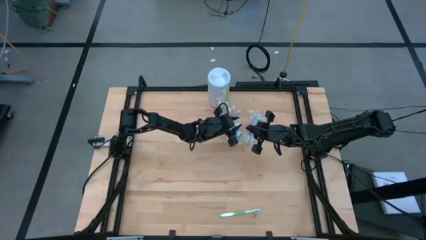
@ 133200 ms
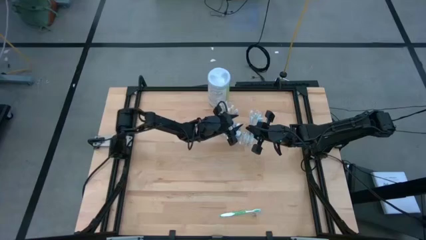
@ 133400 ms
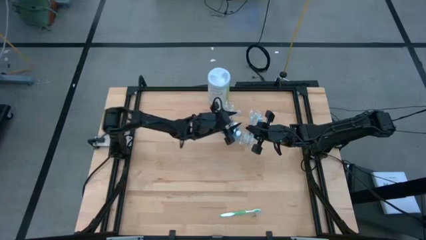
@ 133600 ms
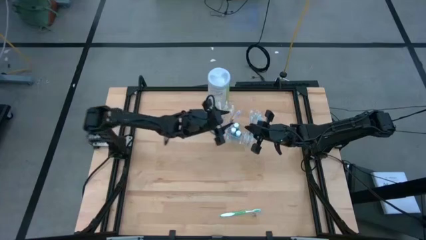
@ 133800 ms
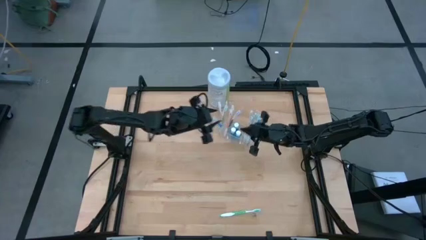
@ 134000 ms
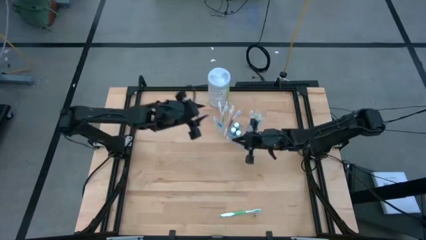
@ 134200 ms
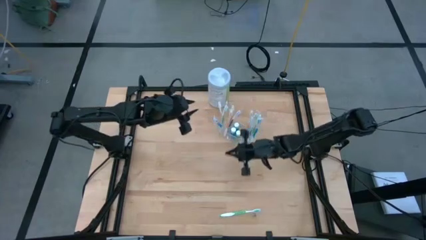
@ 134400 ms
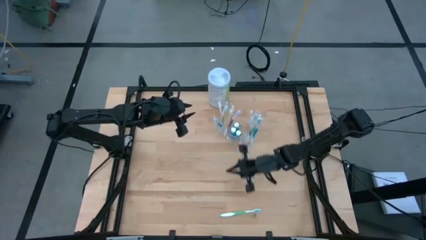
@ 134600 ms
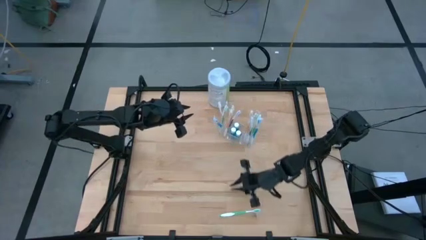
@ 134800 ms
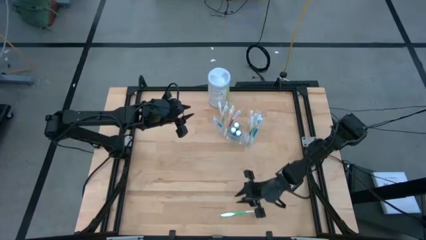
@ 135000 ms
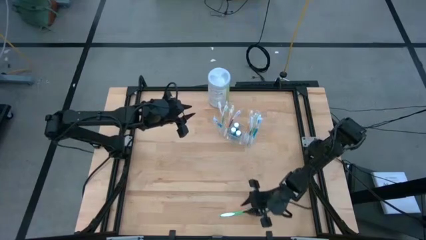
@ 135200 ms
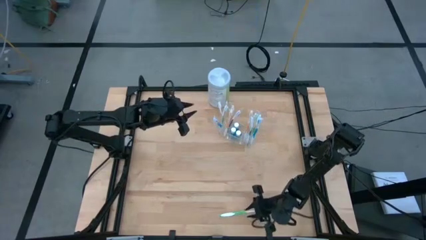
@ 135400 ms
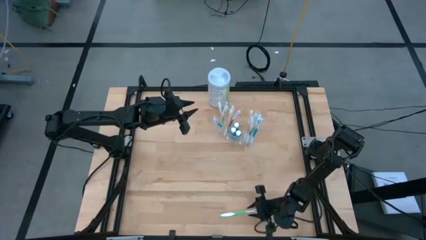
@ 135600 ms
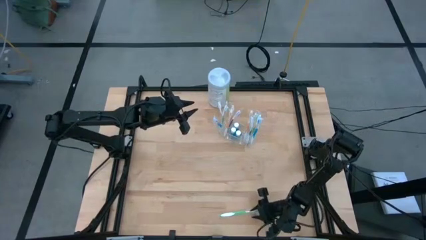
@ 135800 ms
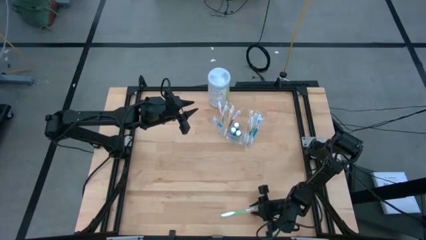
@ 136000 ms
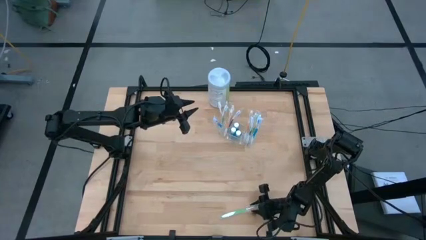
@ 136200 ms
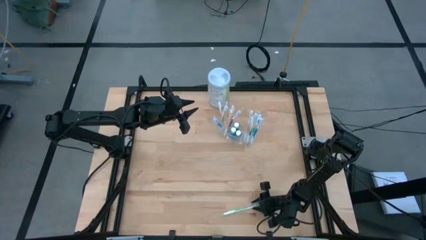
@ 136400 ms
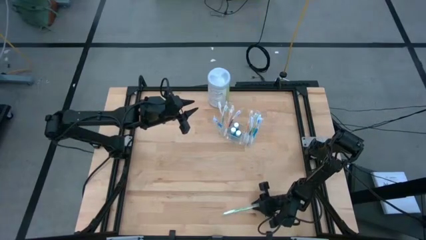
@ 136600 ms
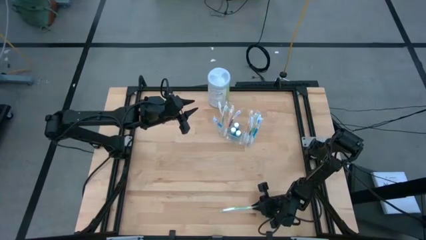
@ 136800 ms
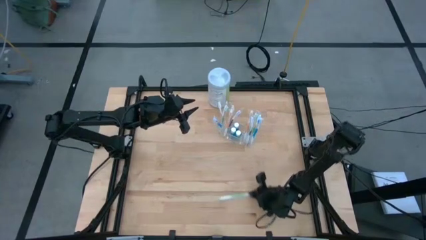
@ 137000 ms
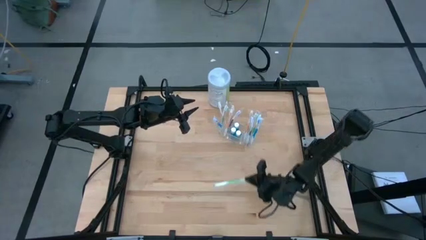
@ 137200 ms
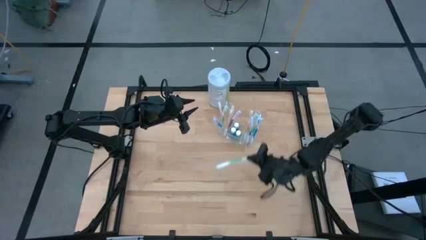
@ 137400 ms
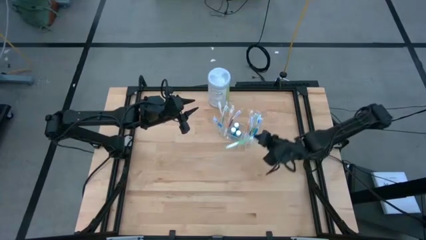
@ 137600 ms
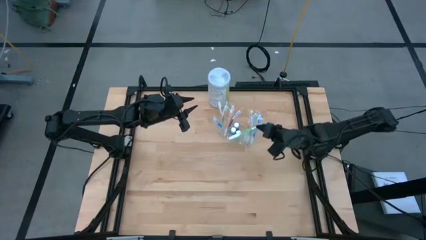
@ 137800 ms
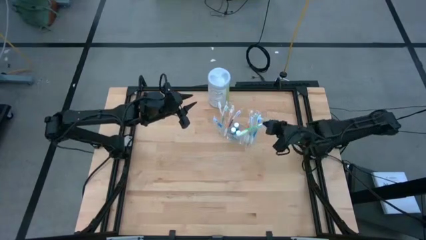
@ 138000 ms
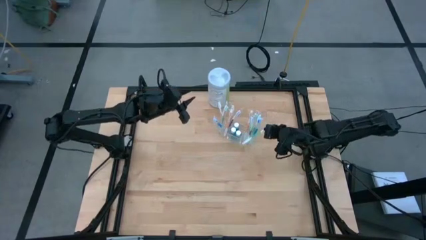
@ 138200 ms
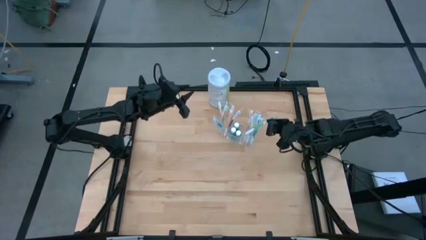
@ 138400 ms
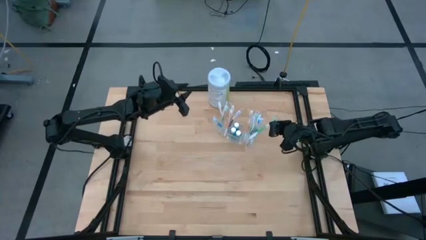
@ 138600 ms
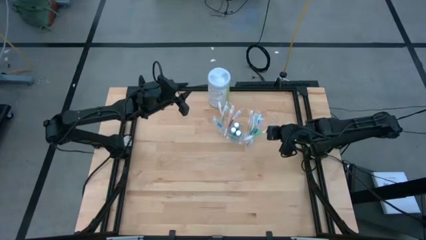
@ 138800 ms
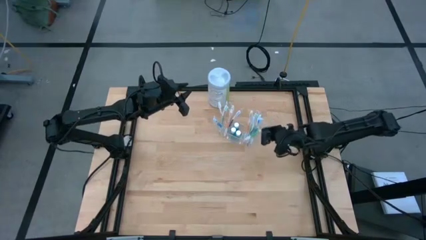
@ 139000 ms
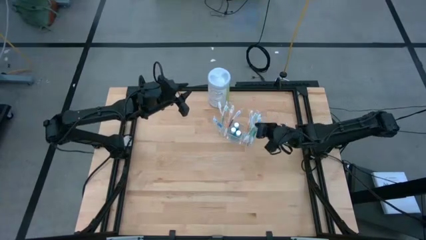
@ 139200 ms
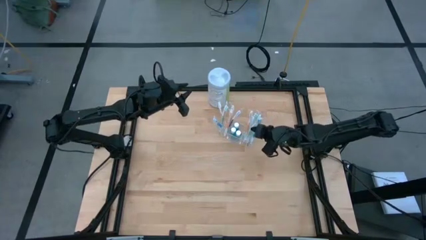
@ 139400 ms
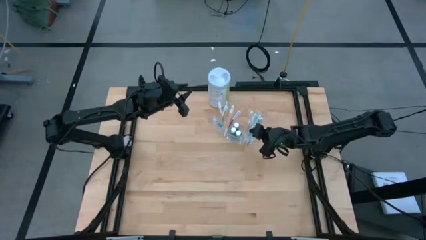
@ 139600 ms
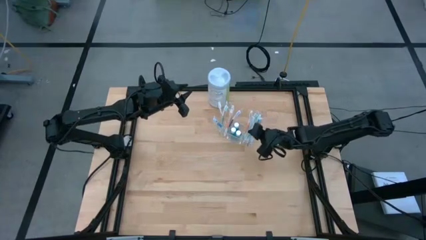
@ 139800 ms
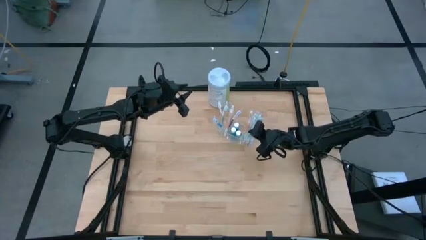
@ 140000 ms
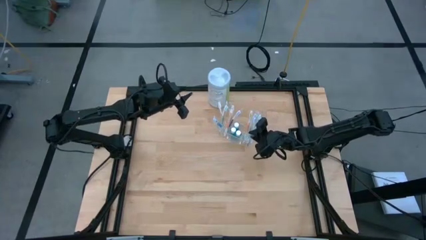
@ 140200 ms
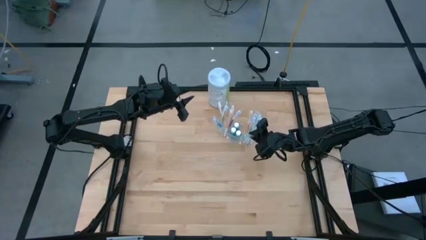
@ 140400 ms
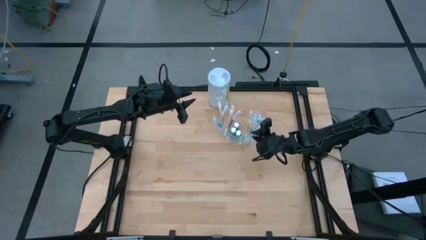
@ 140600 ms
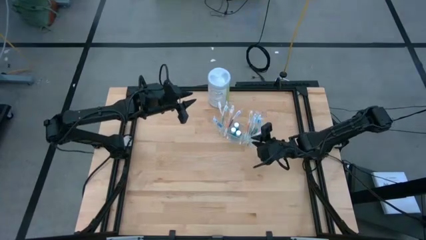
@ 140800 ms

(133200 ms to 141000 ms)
Task: Pick & Place toothbrushing station
Put the green toothbrush into the transparent organizer

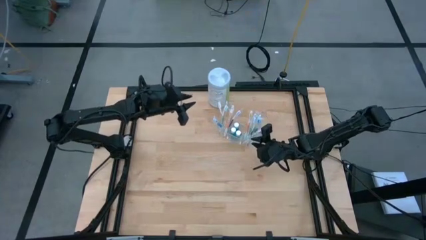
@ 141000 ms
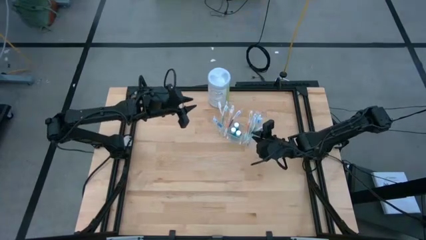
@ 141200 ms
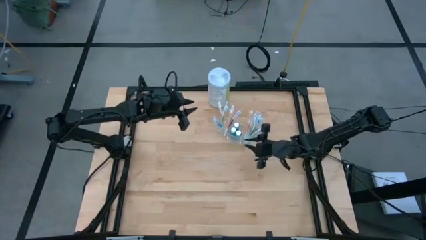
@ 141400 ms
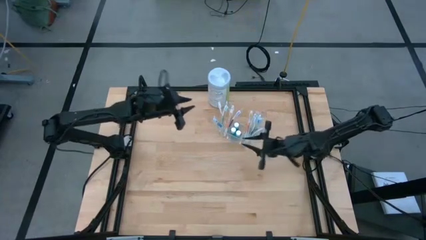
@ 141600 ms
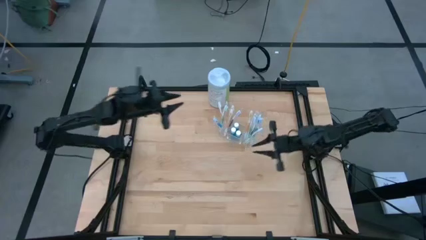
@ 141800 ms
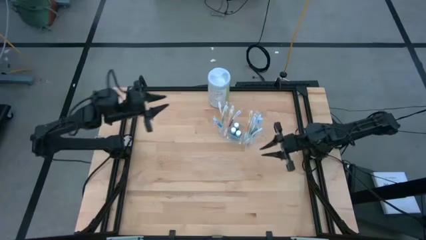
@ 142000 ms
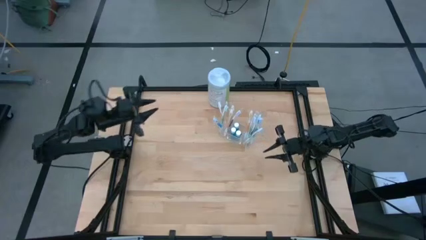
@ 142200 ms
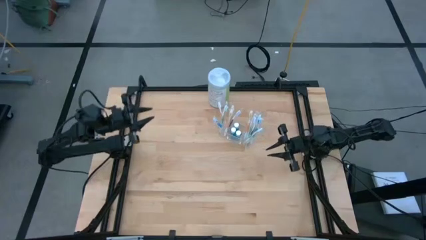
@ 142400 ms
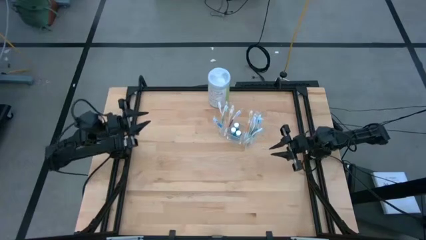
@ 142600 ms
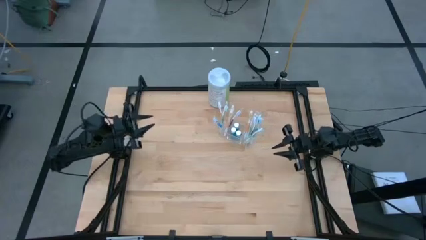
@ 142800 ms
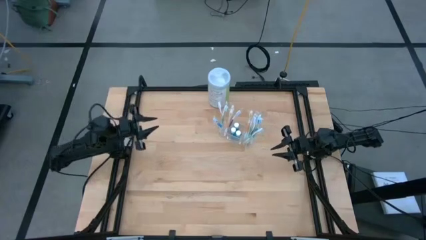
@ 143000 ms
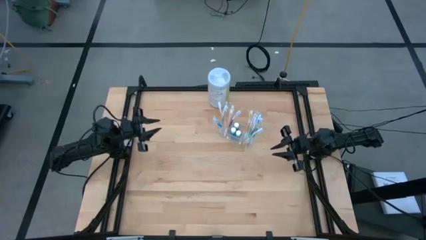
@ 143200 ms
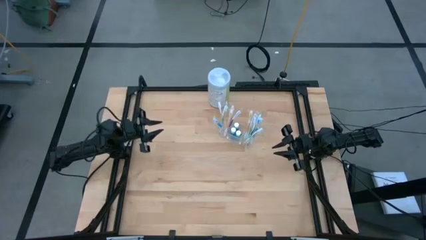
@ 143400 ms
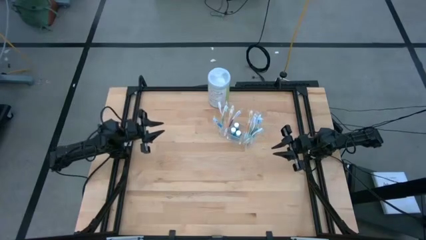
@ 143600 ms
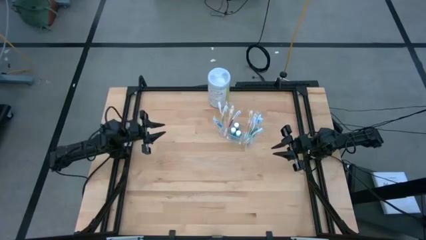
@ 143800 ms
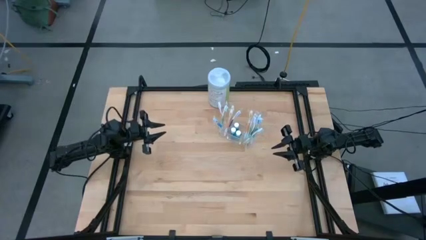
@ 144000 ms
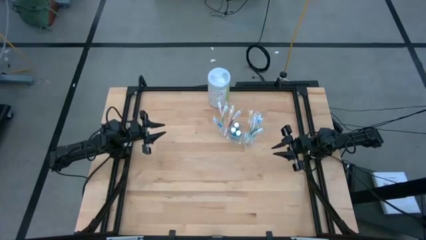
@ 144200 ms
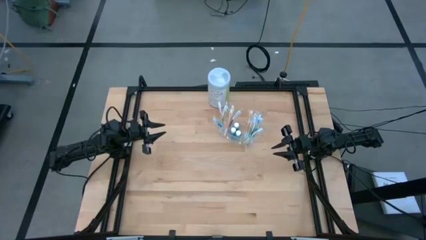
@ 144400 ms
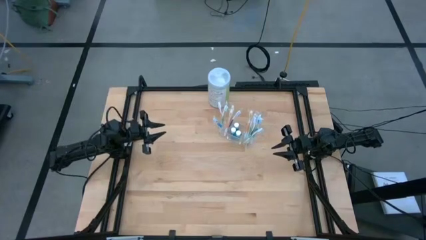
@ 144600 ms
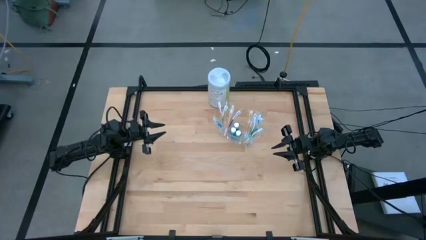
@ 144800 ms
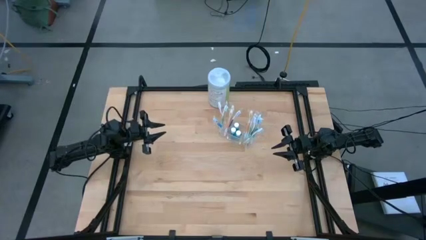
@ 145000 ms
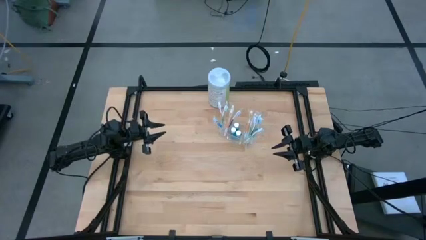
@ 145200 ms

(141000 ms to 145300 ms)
Return to Home Position

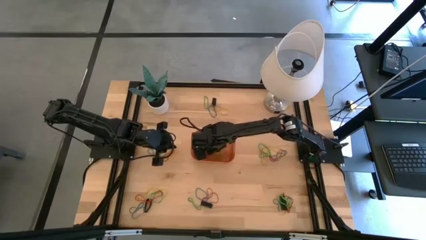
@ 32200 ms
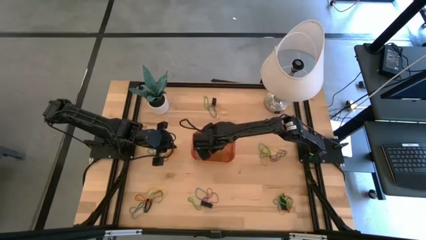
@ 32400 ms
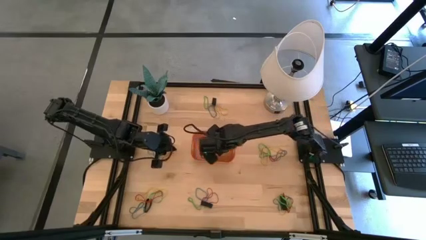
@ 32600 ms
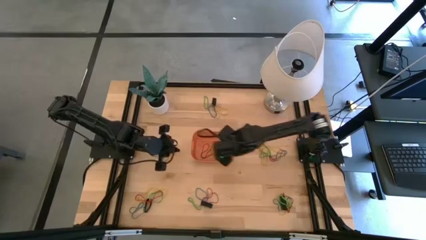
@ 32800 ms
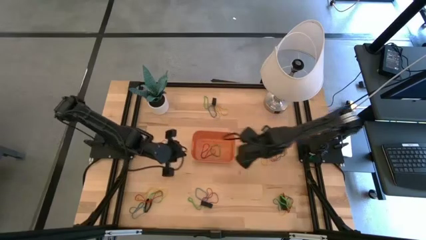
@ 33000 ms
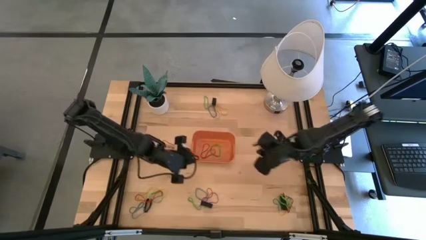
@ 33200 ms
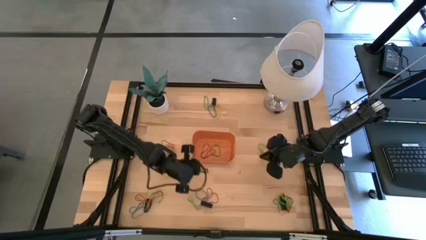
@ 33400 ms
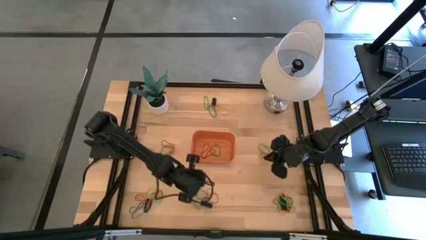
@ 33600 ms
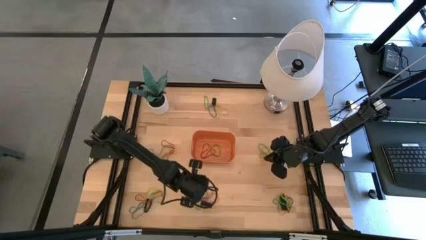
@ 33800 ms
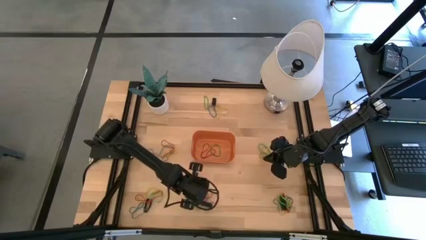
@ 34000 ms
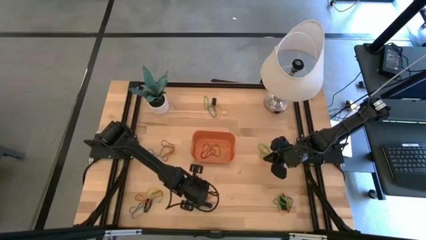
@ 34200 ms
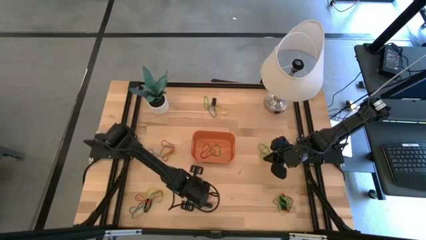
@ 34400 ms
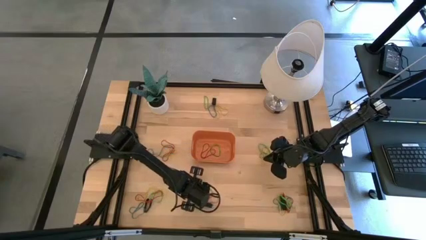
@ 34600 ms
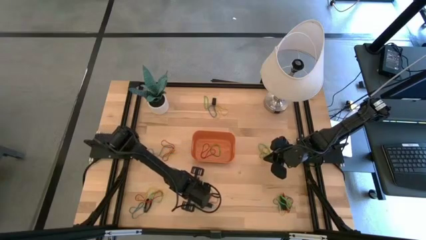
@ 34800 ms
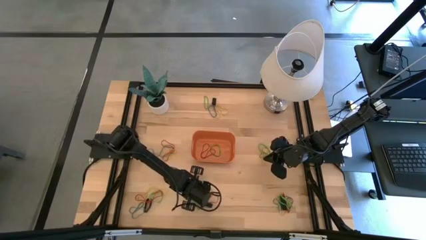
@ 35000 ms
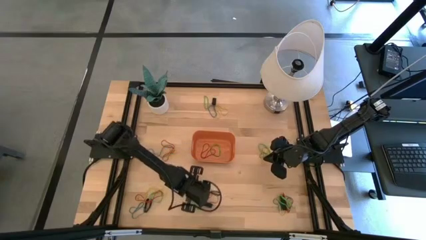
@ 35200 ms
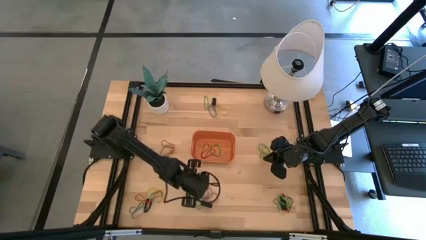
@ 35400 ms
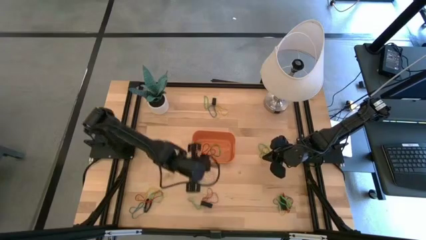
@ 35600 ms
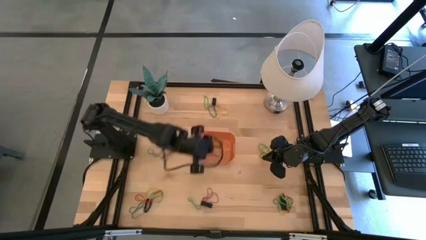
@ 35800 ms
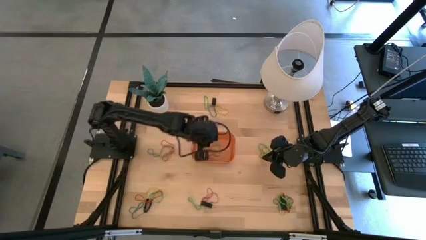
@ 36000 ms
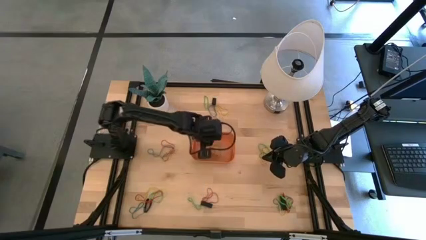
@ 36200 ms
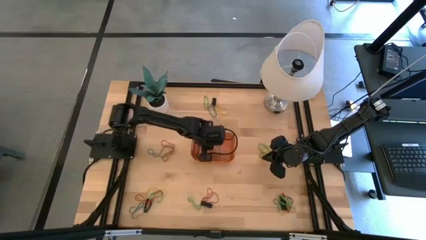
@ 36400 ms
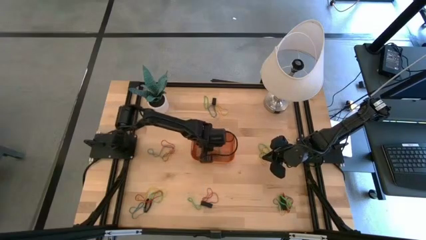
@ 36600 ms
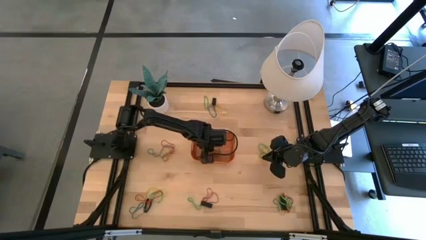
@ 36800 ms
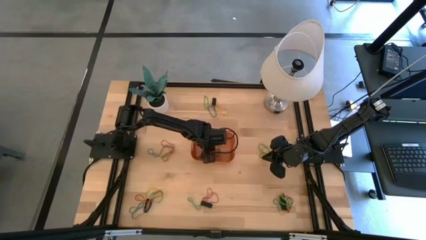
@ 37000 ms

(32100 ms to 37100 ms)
Task: Pick and place rubber bands into bin
Put the blue rubber band into the orange bin
